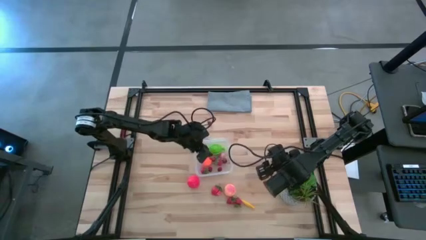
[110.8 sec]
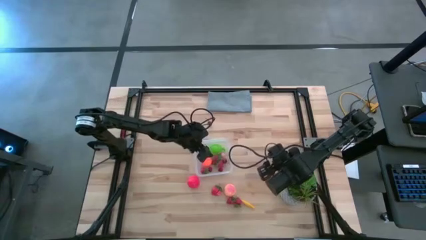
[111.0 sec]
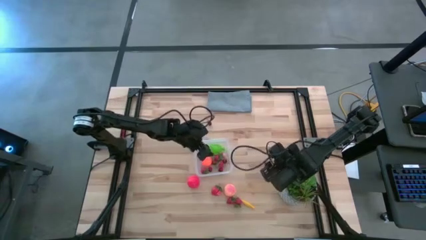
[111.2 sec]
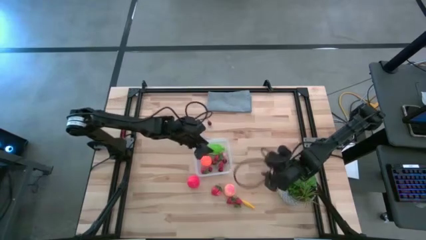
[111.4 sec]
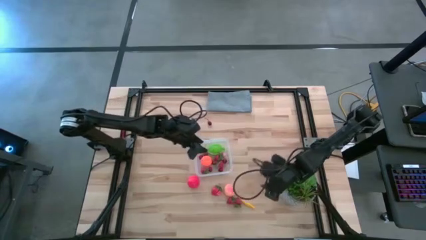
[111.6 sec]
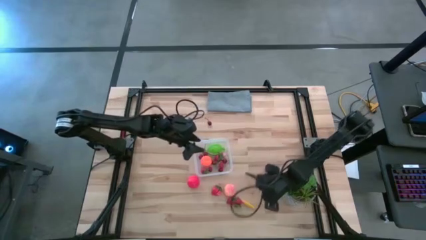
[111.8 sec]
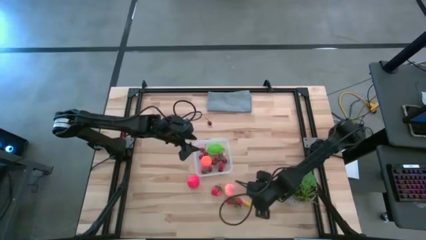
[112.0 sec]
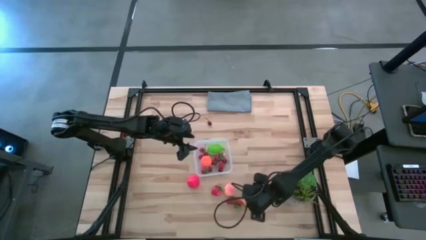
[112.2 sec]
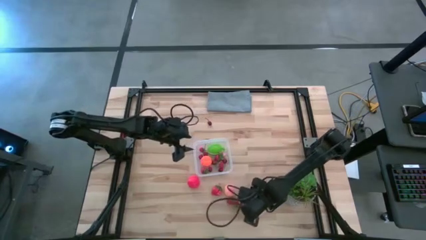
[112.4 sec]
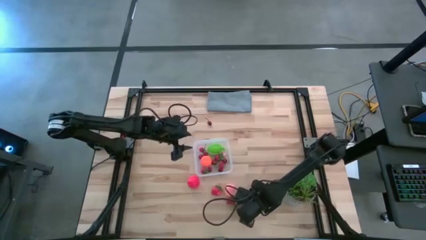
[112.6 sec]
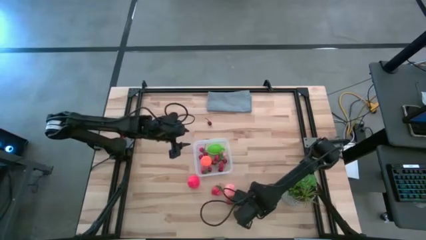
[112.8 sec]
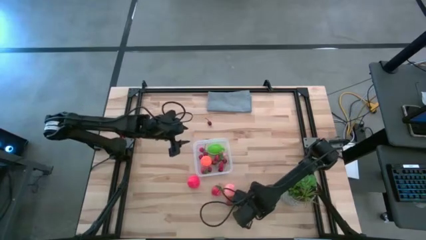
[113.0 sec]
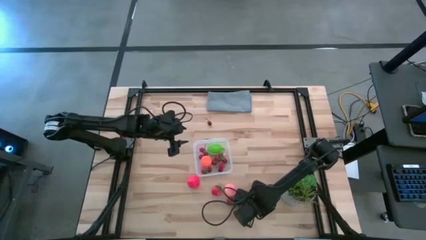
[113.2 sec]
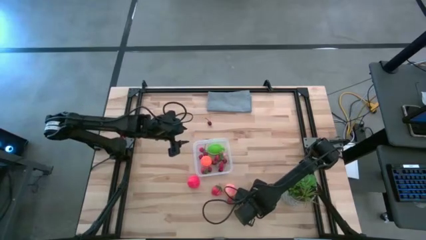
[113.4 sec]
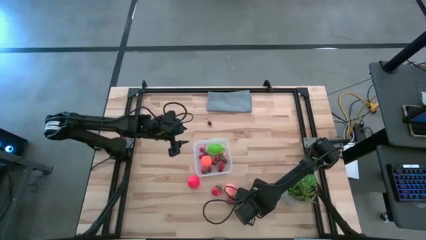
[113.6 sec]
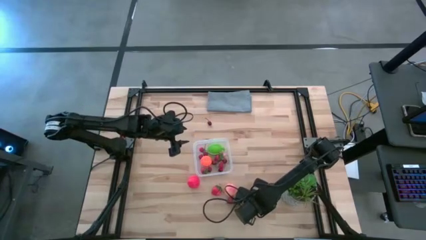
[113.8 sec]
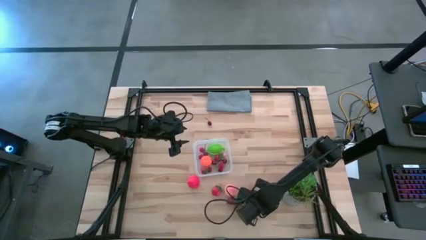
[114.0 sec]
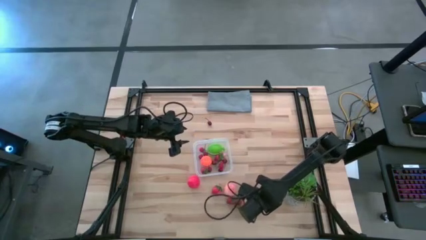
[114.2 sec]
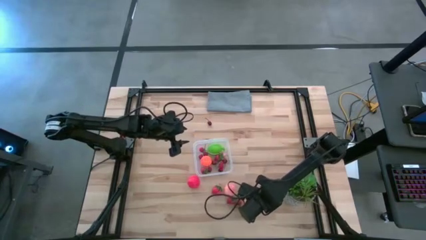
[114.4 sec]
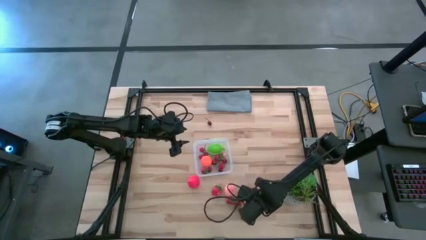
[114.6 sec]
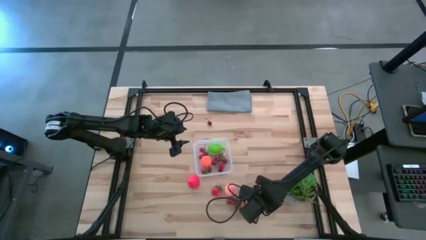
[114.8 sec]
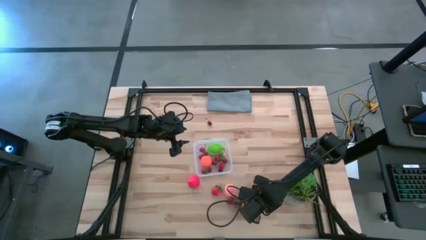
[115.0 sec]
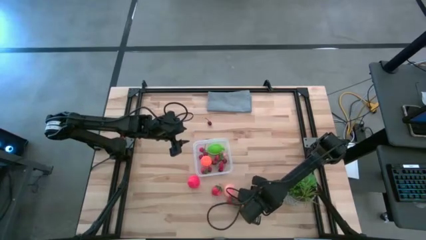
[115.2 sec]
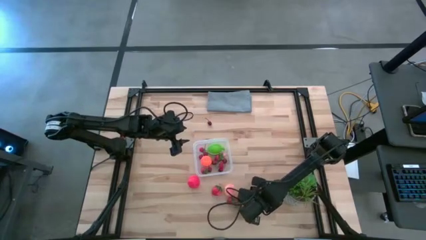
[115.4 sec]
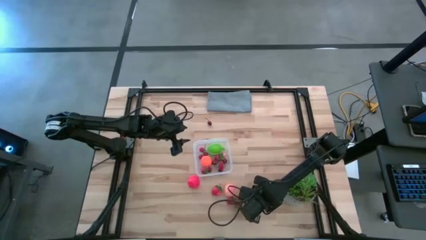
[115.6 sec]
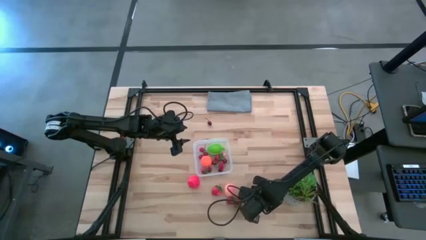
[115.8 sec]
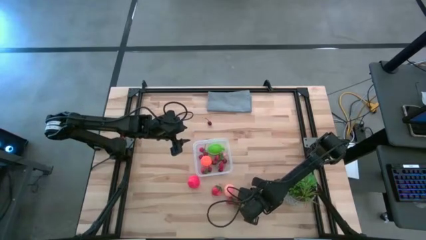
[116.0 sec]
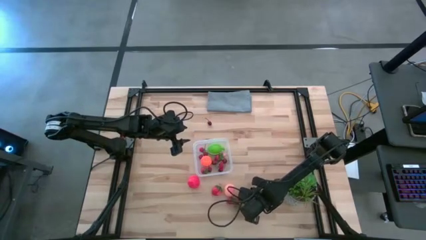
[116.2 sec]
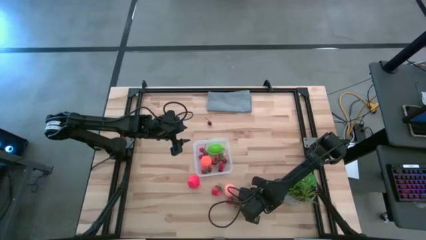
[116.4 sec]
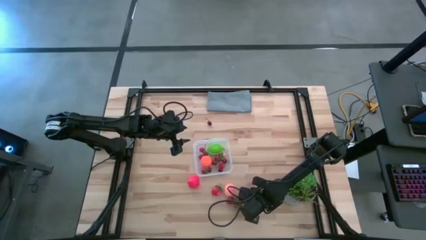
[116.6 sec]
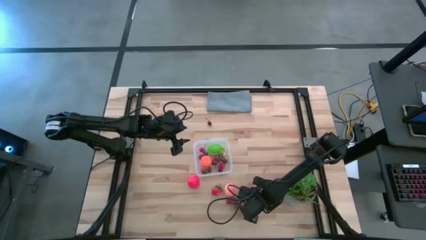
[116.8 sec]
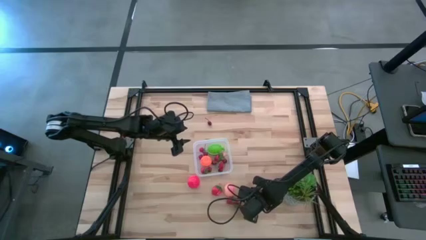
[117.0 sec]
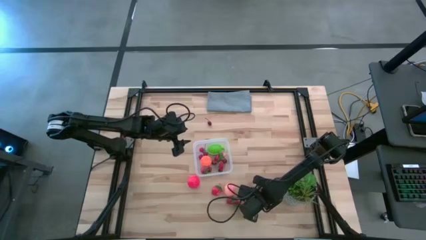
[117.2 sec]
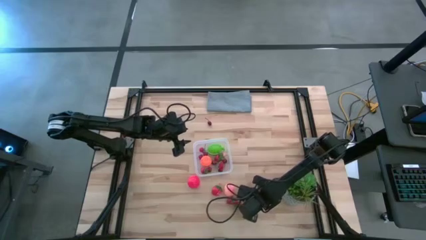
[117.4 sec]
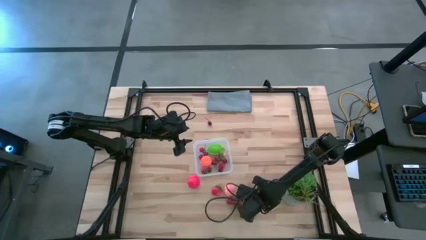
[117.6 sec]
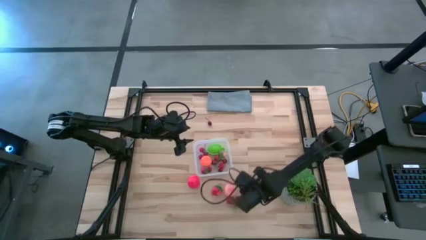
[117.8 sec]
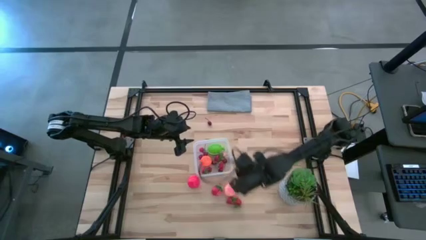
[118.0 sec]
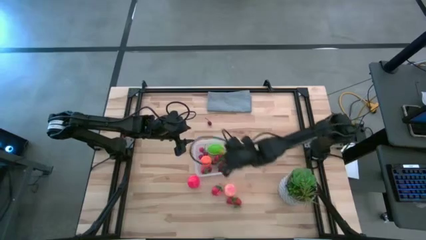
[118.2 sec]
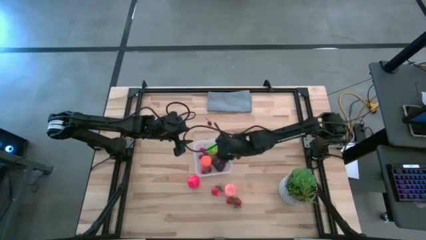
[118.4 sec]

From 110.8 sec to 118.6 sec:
Task: Pick and placing Produce into tupperware
Put the yellow corn into the transparent container

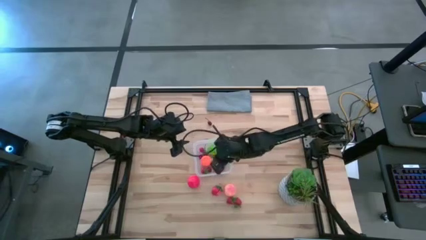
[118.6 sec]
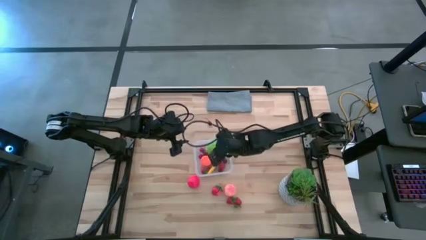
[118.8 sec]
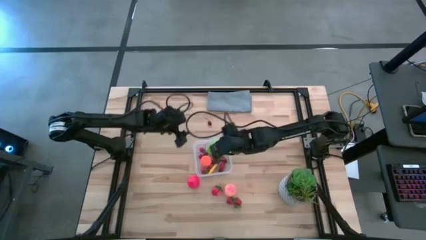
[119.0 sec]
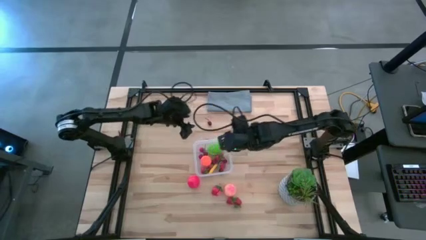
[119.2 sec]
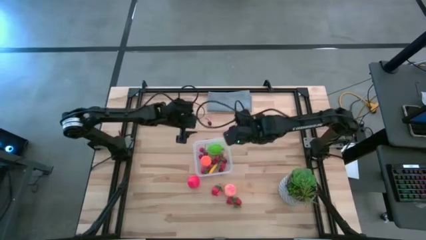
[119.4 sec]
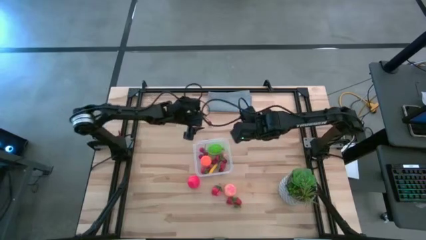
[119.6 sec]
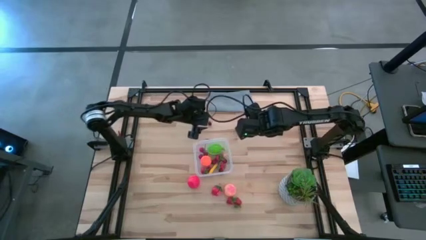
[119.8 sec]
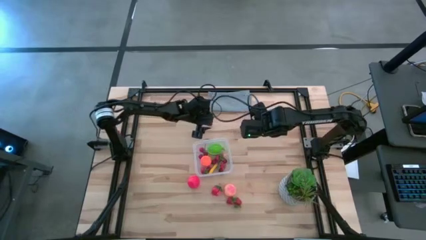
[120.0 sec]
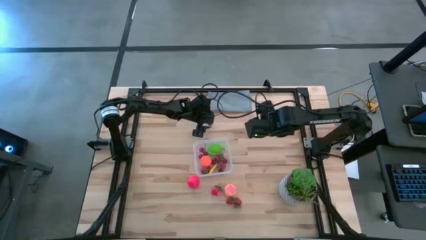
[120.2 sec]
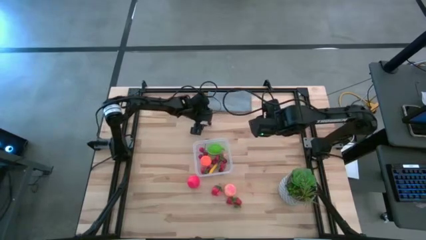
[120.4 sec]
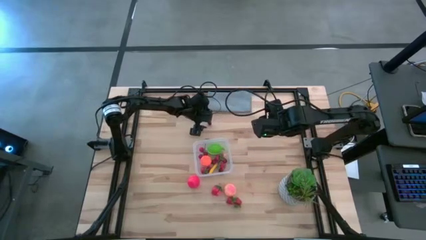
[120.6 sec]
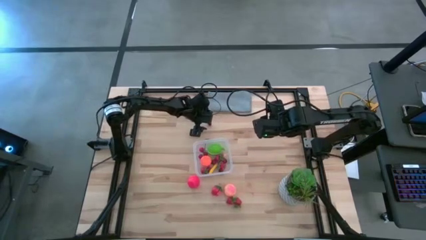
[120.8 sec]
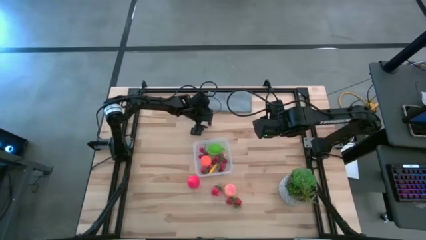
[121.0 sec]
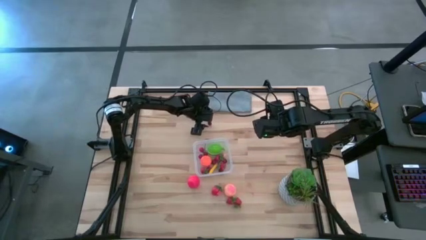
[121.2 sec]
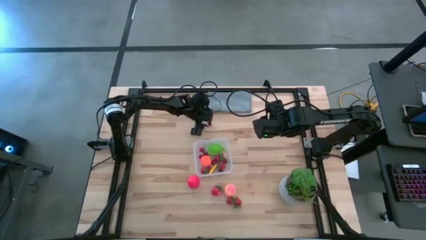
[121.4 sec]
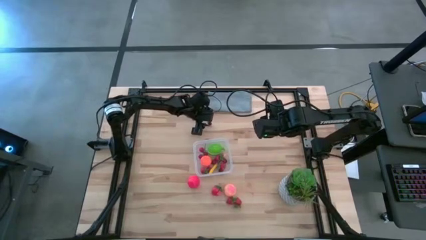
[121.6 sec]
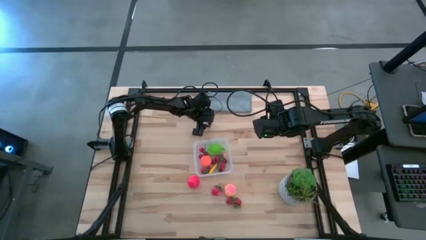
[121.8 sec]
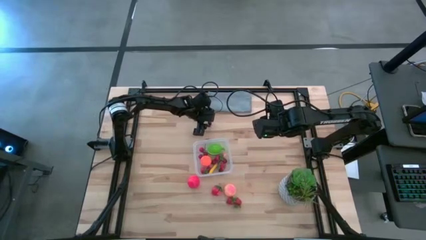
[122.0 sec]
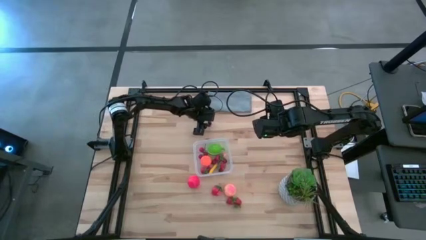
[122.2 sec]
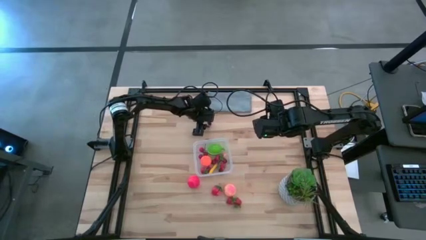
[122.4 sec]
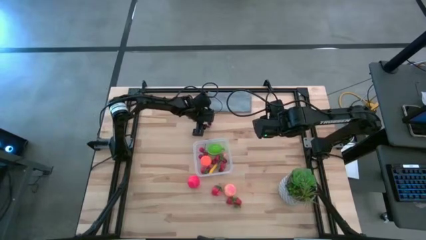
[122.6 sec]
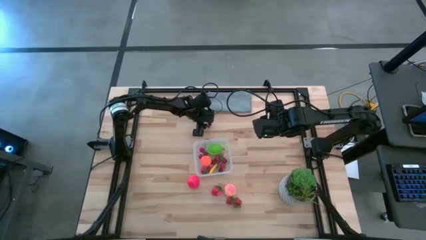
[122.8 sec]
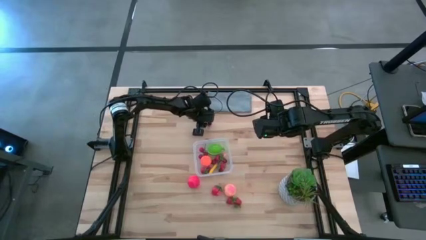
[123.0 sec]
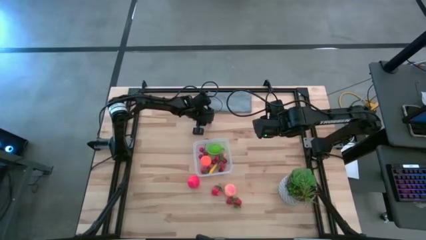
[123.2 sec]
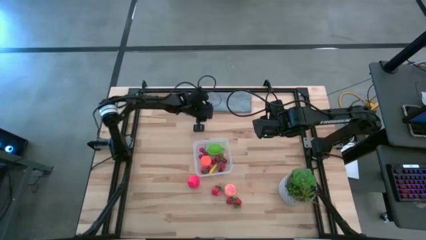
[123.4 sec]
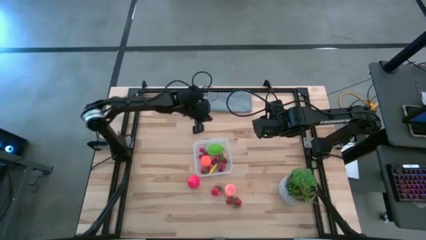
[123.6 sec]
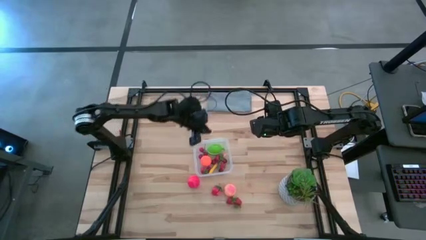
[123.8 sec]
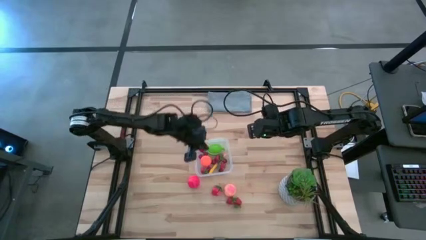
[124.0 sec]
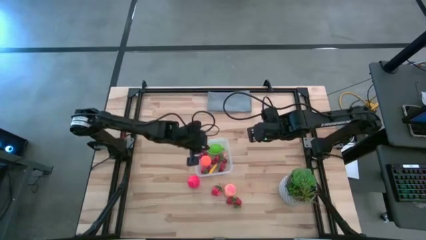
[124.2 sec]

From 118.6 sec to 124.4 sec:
Put the red cherry into the transparent container

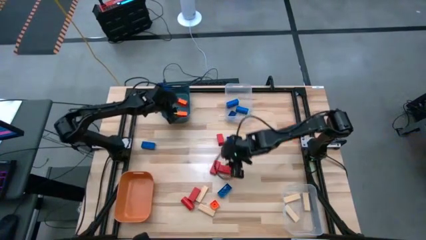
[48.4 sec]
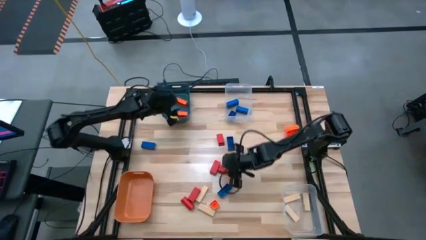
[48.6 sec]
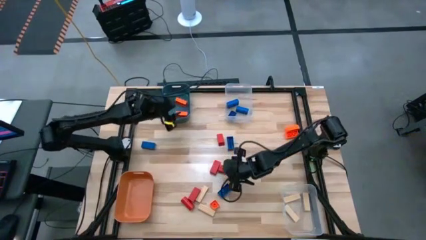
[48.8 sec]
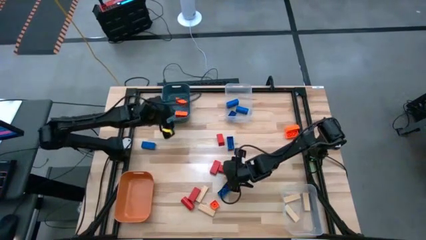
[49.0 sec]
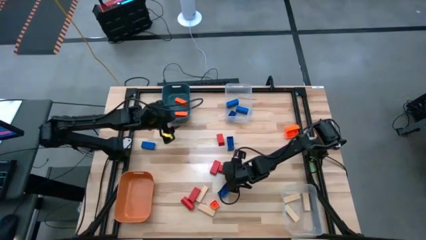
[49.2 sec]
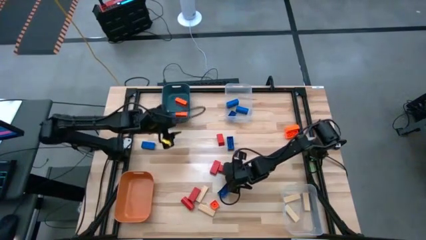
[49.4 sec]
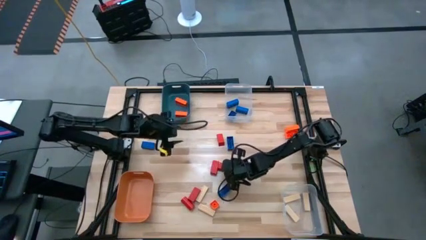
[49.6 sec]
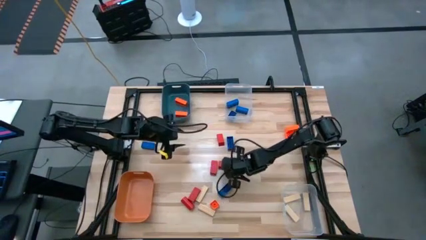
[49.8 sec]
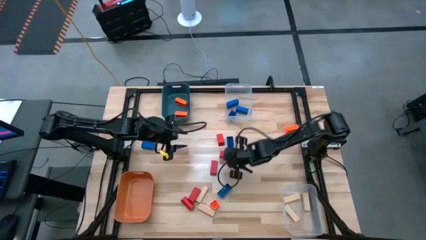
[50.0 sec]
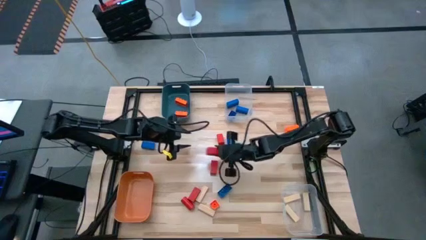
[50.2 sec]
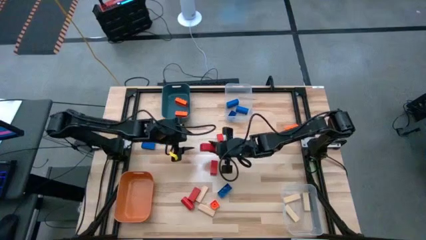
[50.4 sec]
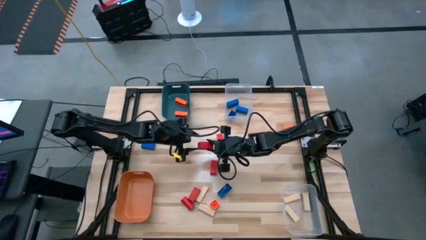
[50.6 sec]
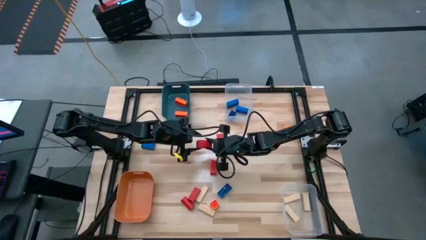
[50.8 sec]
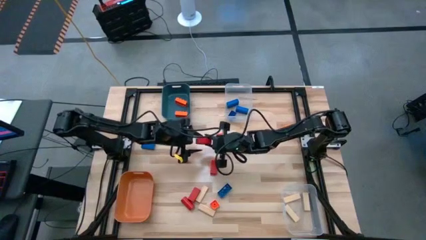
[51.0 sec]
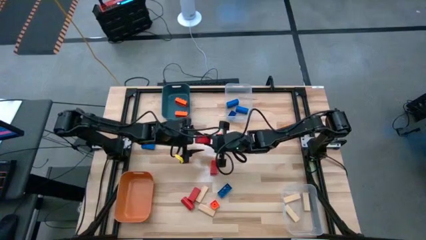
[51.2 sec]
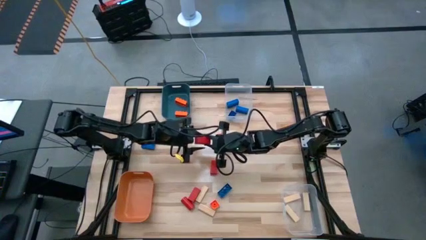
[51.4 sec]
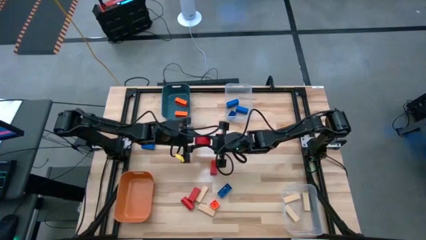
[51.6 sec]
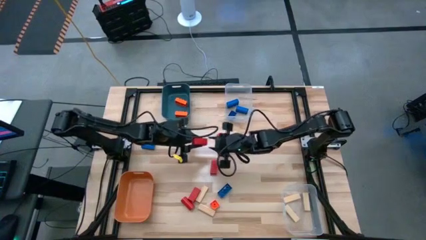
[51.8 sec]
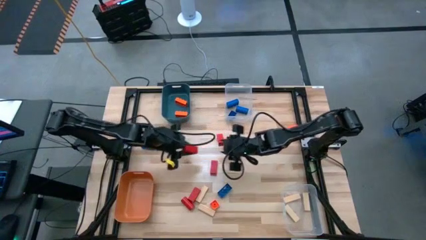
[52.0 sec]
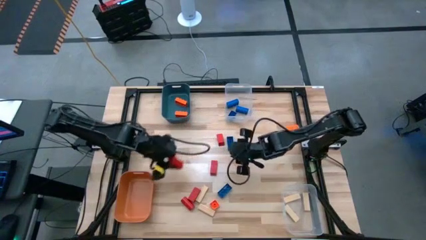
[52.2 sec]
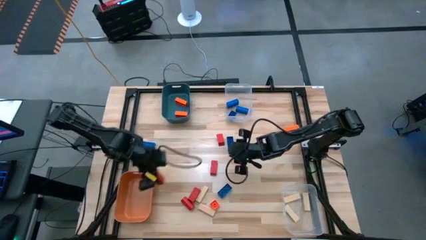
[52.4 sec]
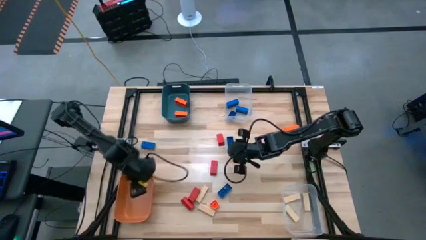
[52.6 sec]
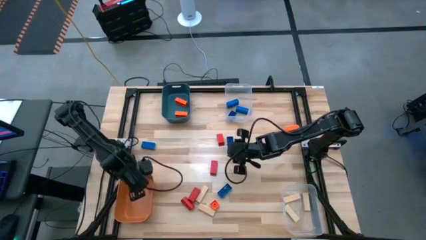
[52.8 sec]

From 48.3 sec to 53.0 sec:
Task: Sort blocks
Put the red block into the orange bin
